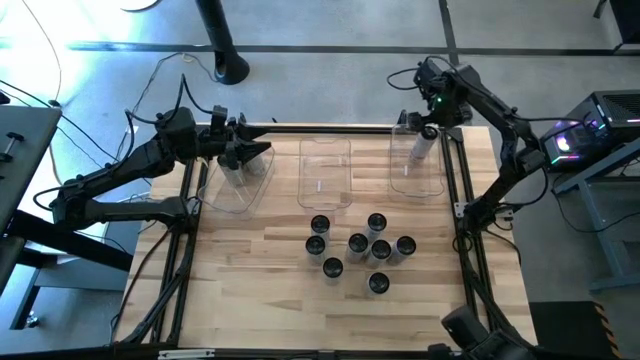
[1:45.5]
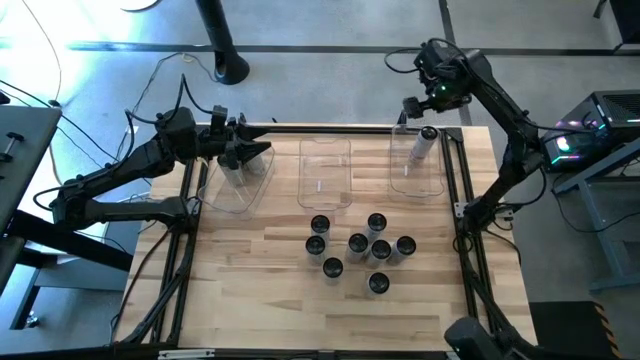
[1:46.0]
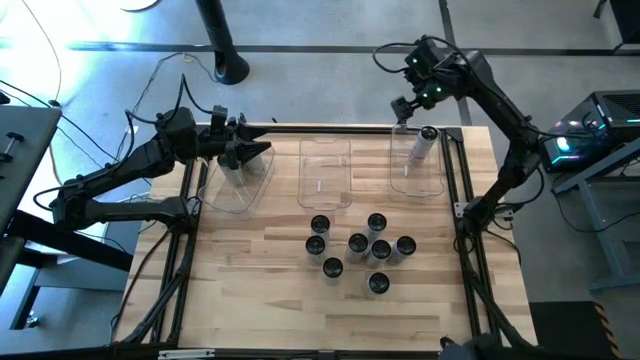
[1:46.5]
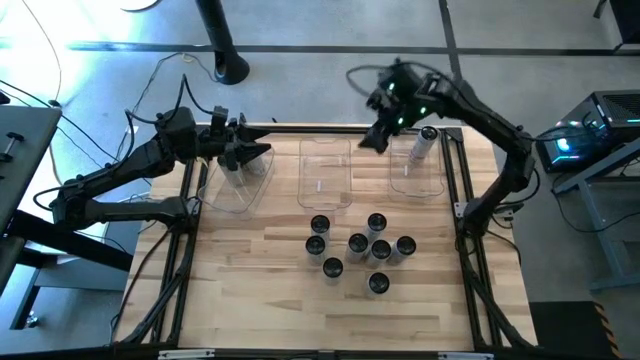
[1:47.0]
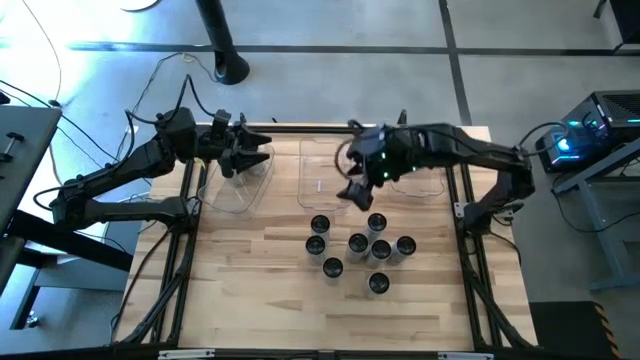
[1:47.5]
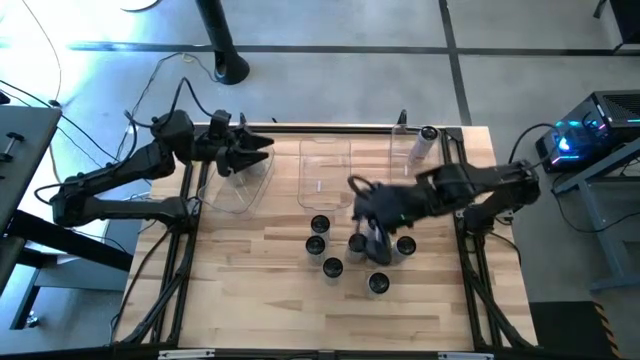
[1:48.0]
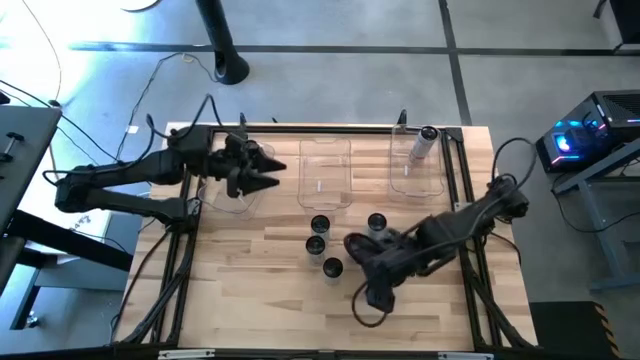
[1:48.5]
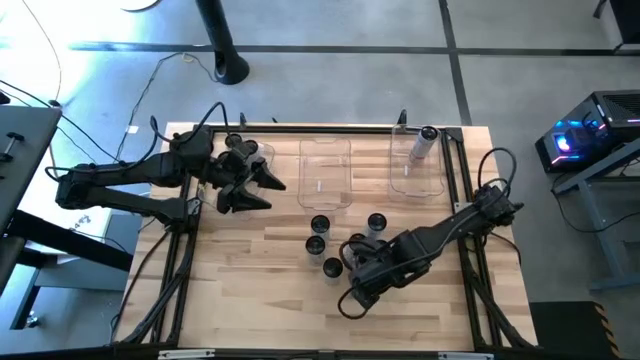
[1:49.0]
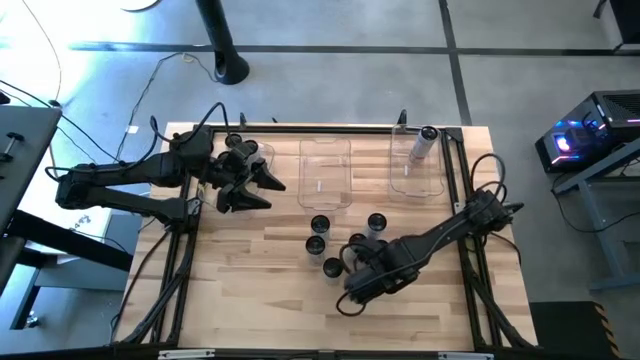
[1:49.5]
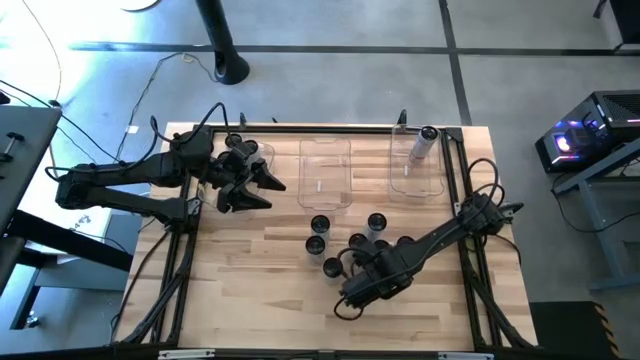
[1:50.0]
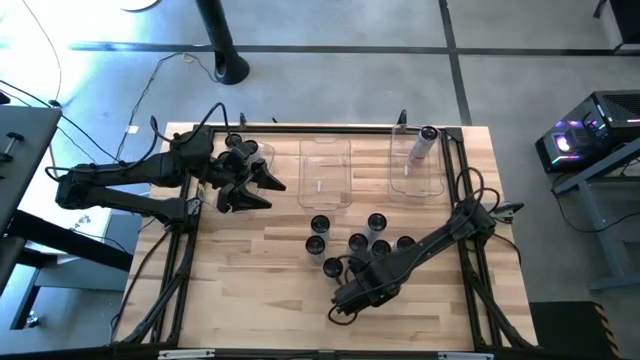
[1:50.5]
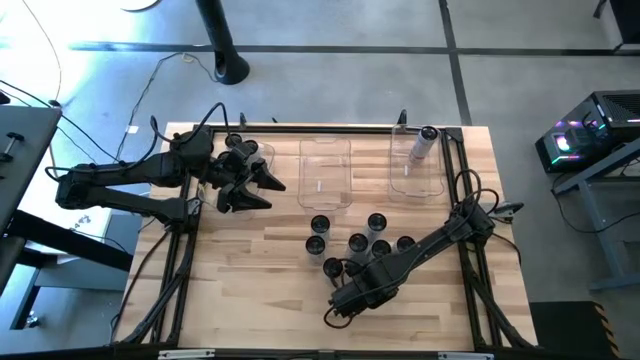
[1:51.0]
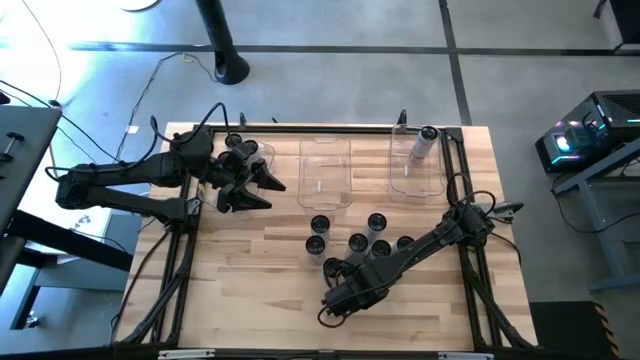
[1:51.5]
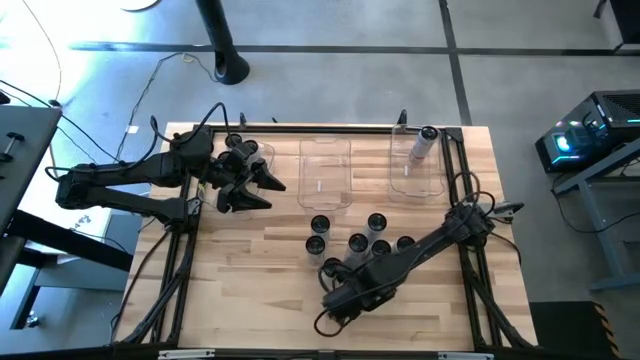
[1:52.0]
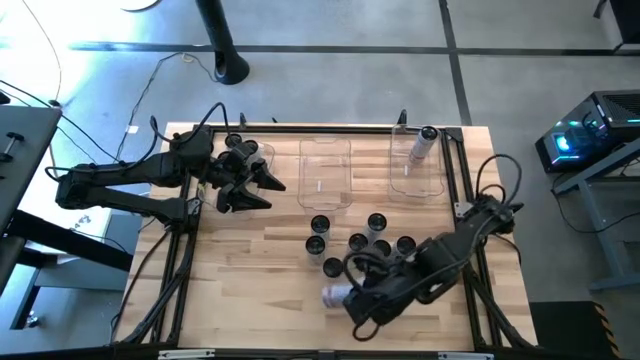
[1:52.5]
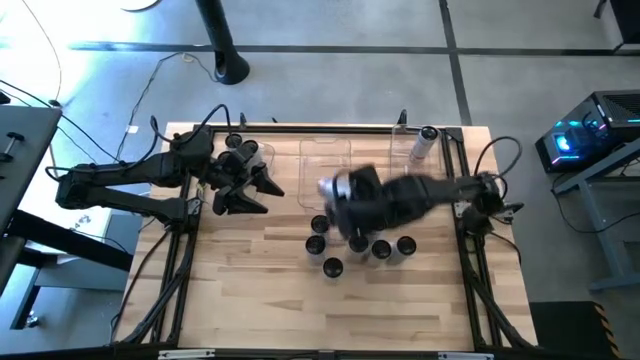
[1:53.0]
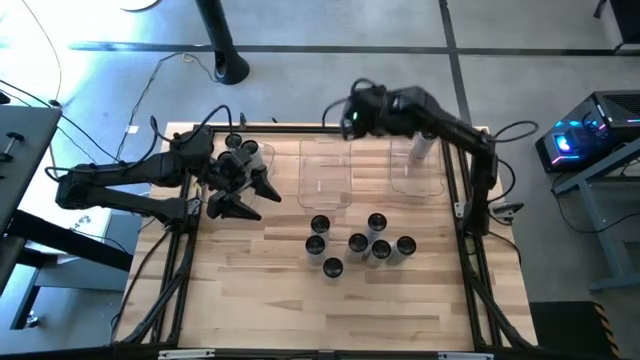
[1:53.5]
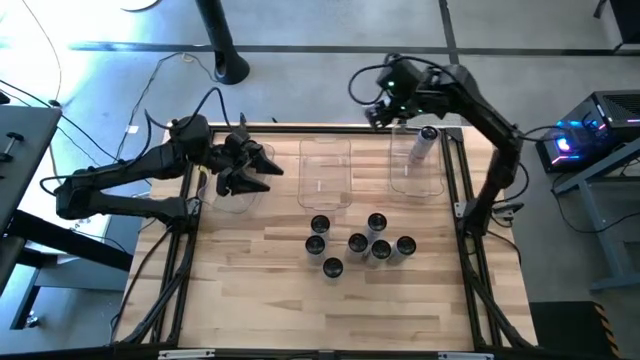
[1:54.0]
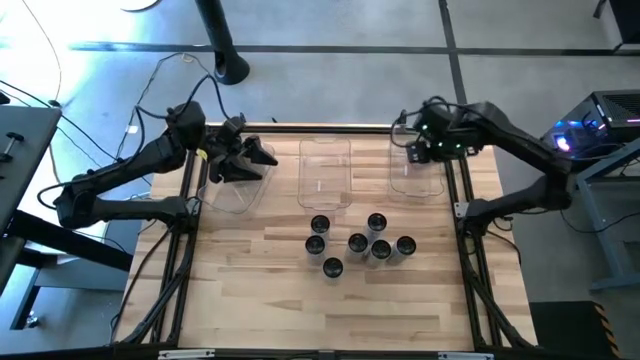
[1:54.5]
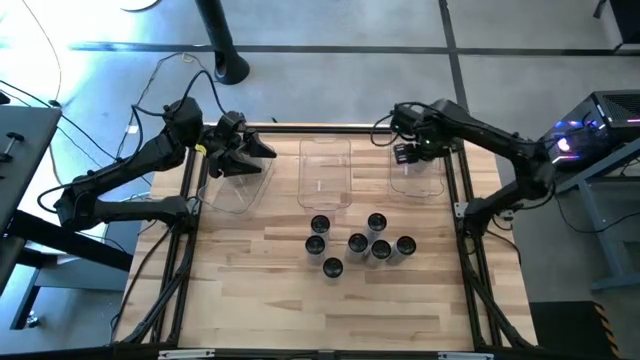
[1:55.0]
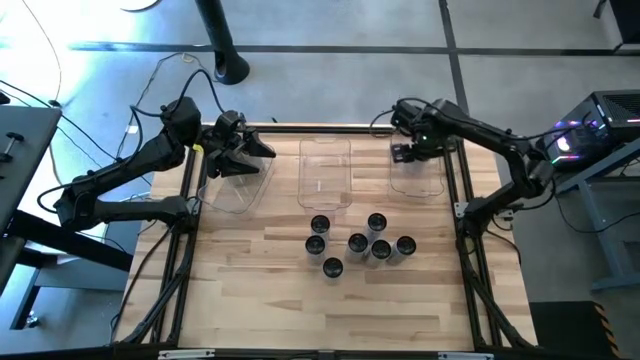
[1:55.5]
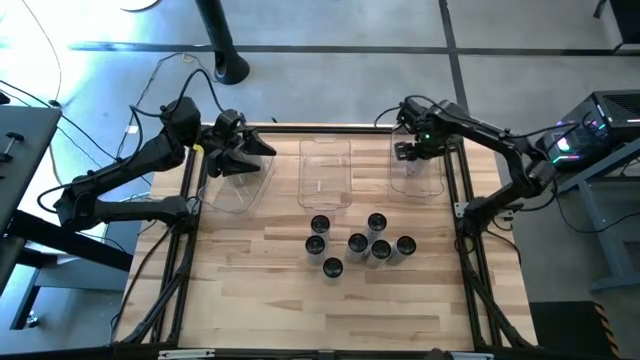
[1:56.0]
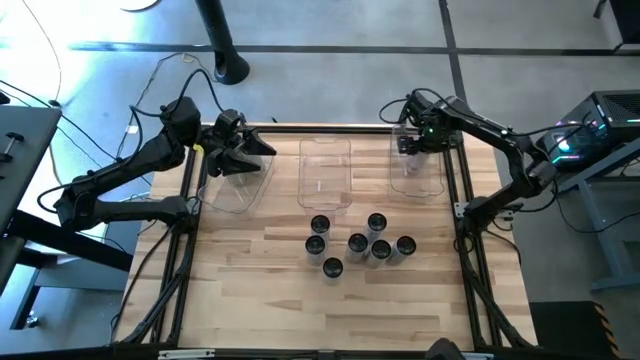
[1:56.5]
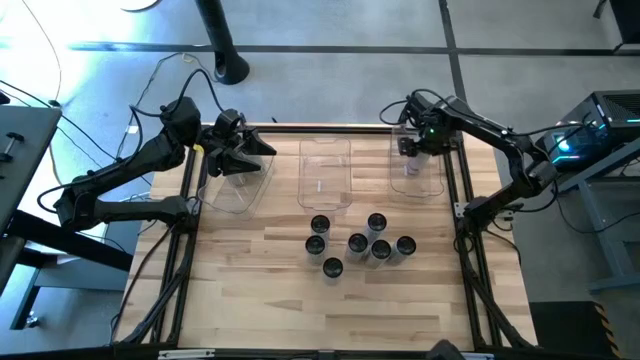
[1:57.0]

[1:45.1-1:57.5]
Task: Sort soda cans
Put the white-pink soda can into the top right transparent bin

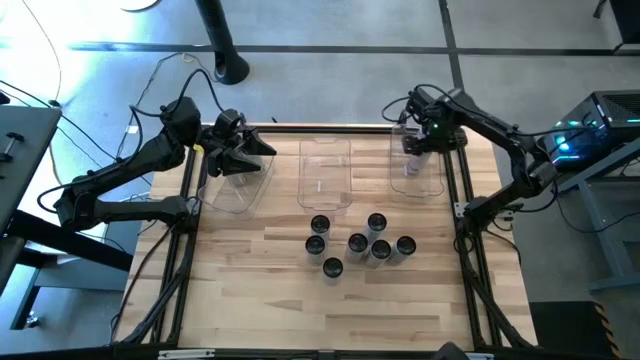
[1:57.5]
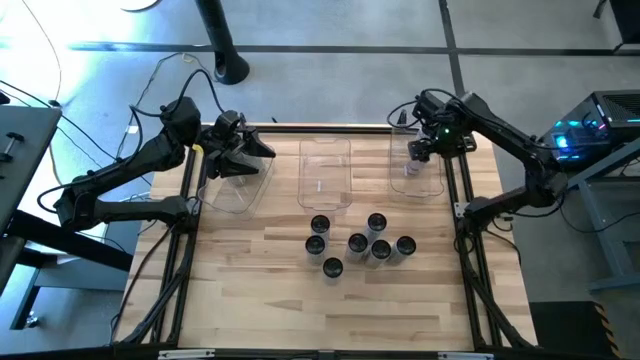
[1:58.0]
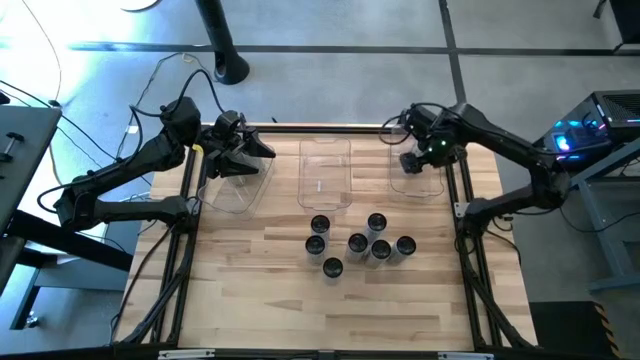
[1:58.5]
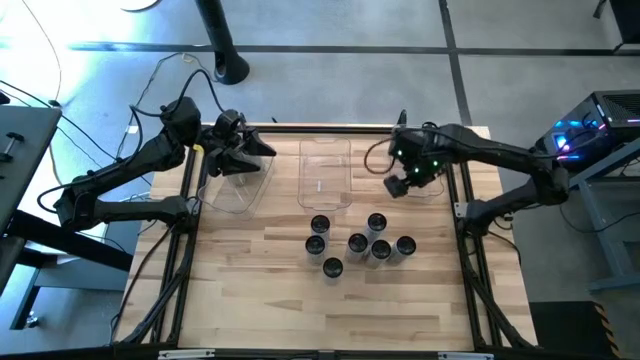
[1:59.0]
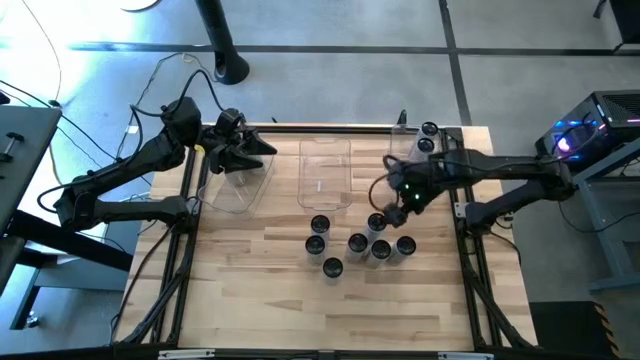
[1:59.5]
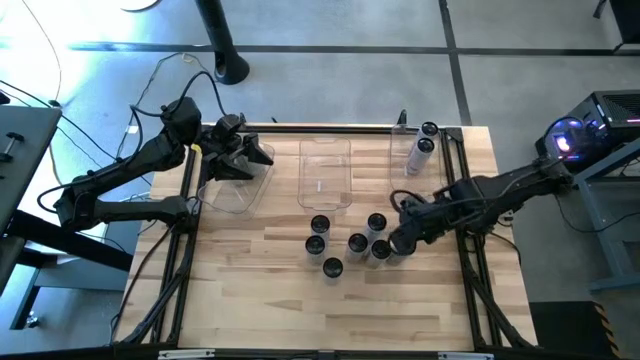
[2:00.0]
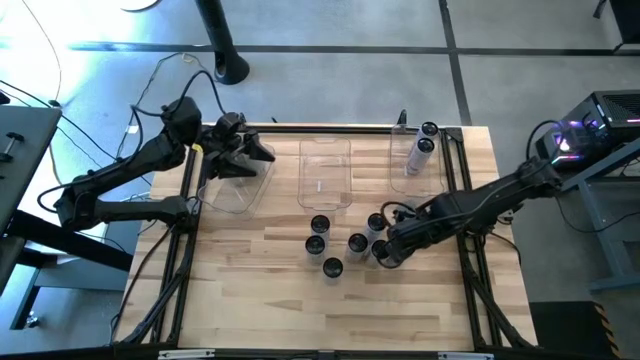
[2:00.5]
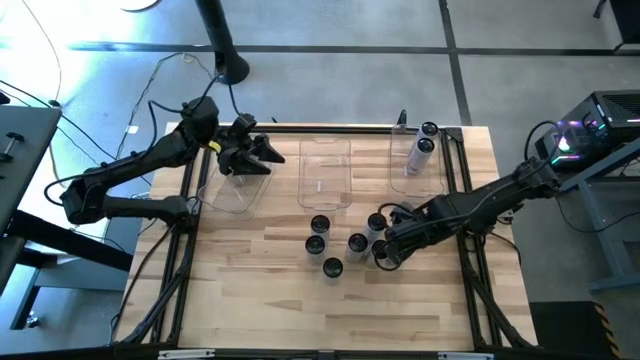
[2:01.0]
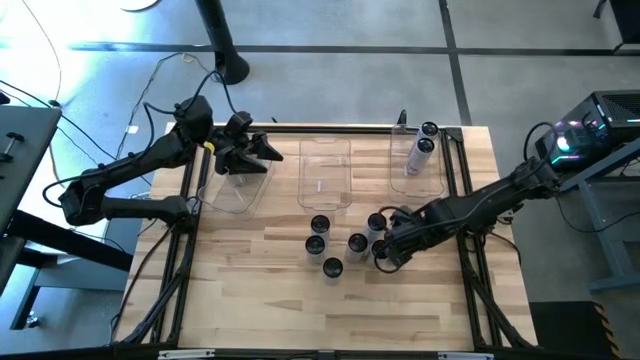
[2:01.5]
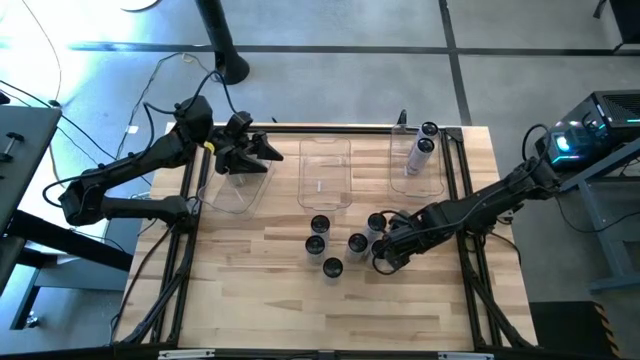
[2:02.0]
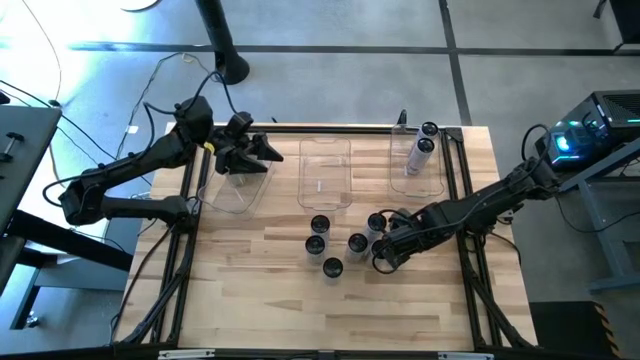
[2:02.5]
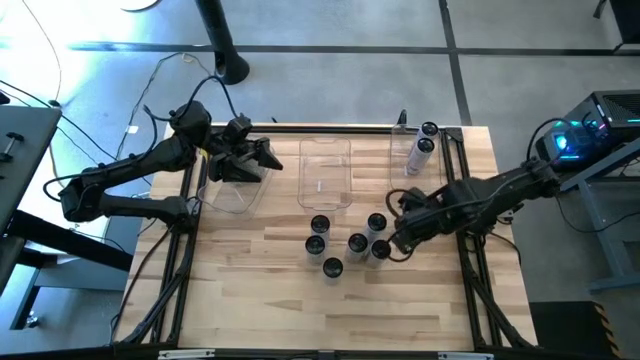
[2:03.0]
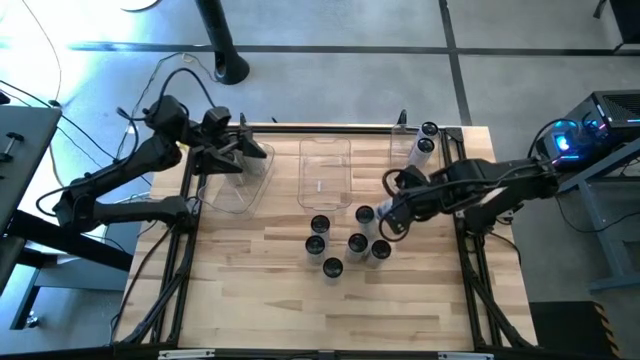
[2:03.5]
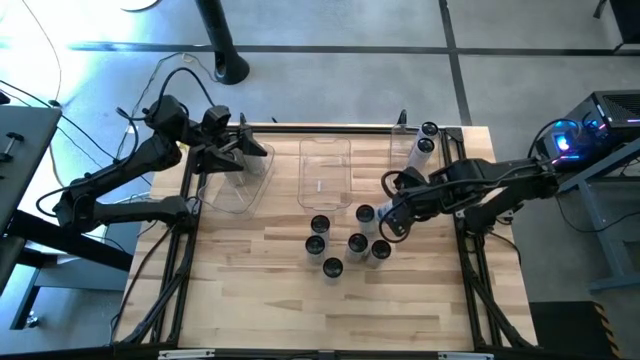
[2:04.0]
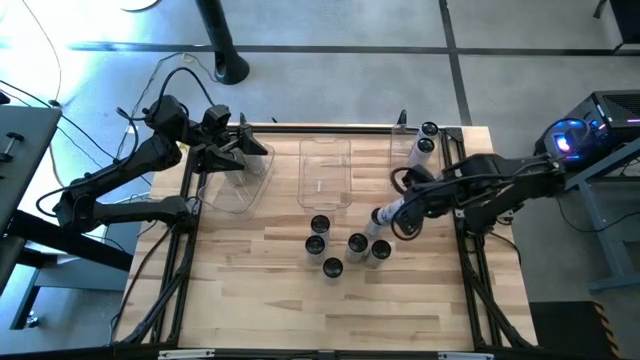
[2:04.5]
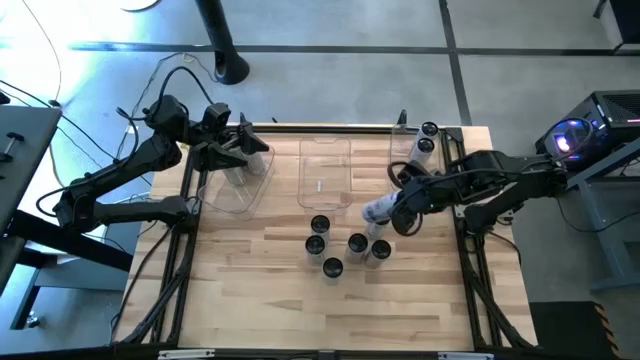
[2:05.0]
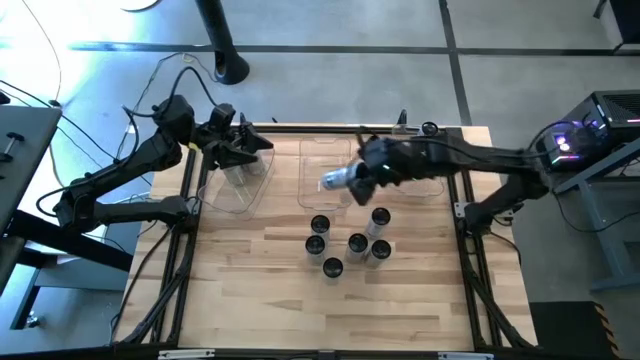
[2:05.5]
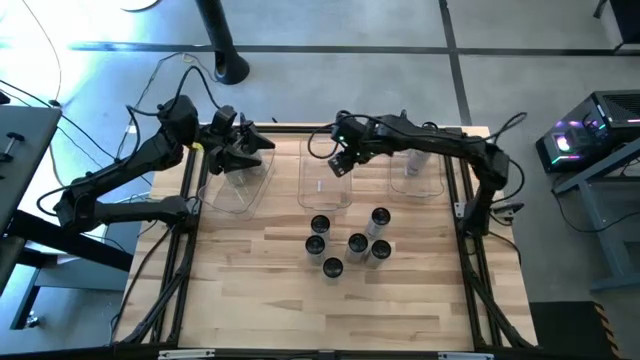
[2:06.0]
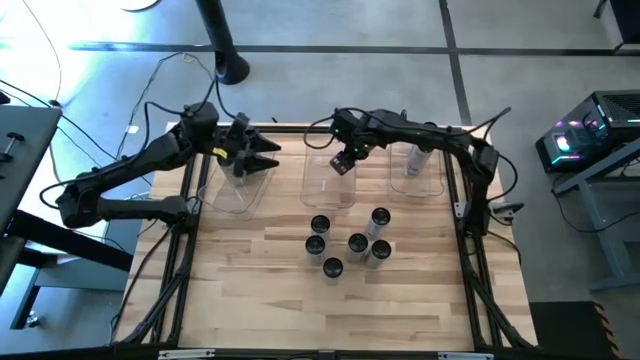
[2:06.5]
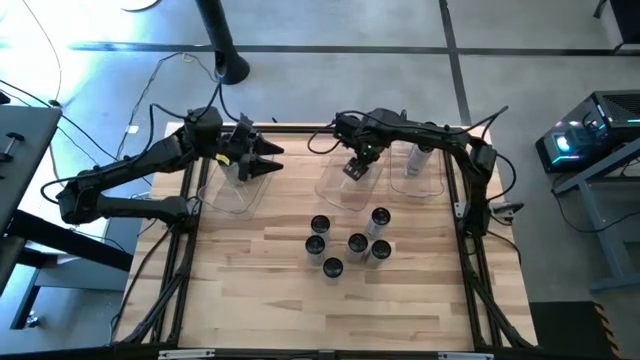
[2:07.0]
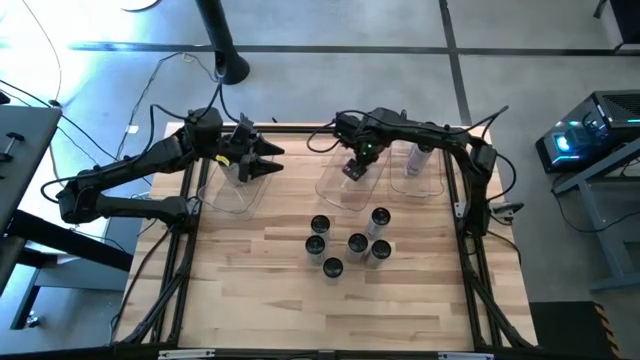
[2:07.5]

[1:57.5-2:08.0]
Put the white-blue soda can into the top center transparent bin
